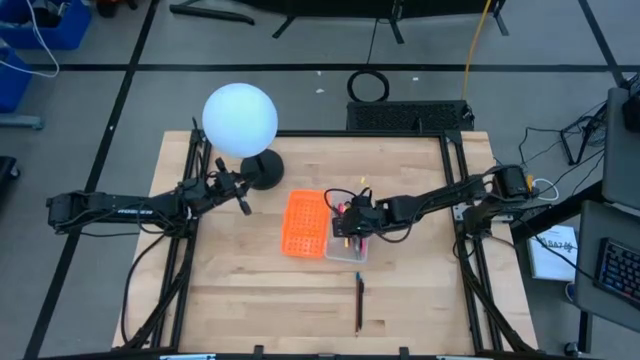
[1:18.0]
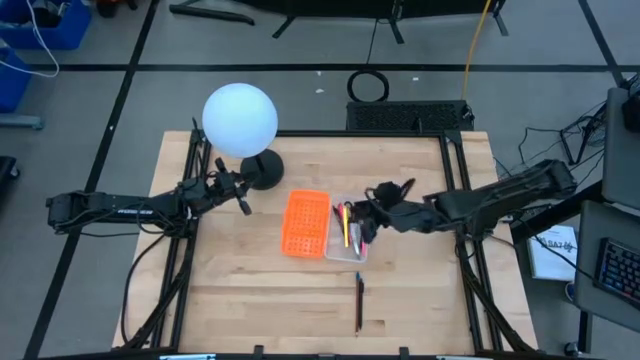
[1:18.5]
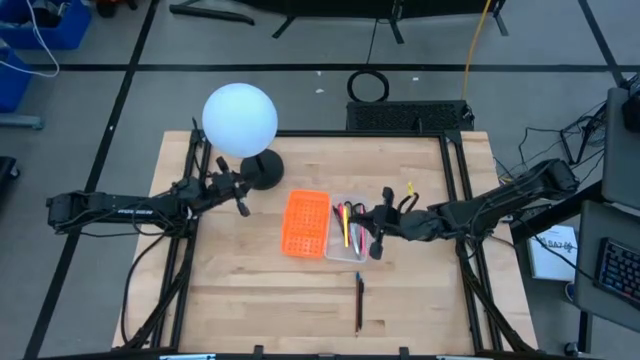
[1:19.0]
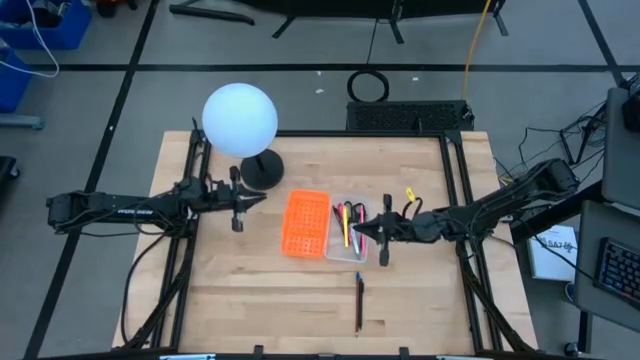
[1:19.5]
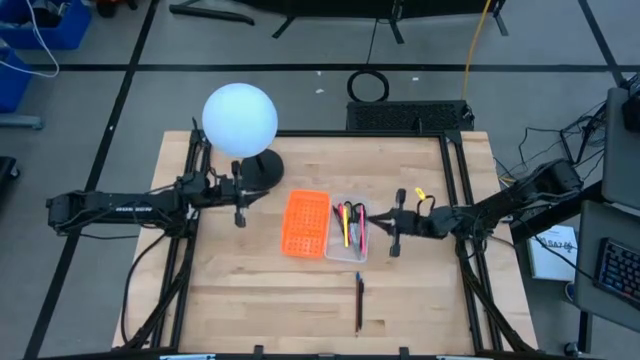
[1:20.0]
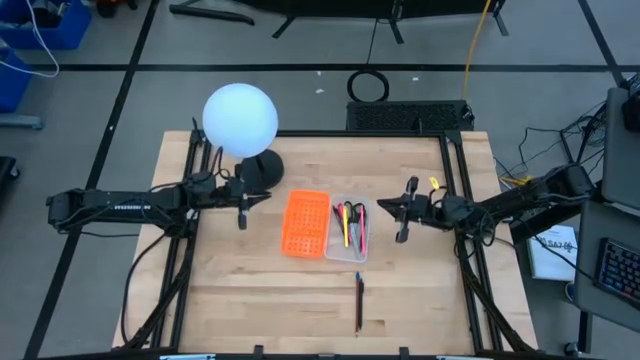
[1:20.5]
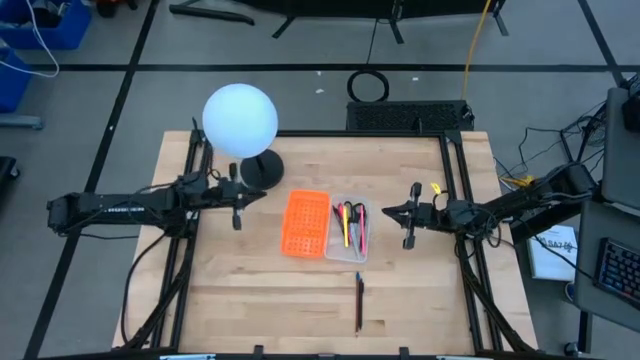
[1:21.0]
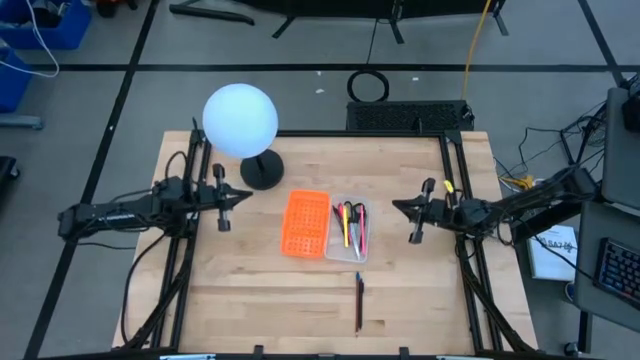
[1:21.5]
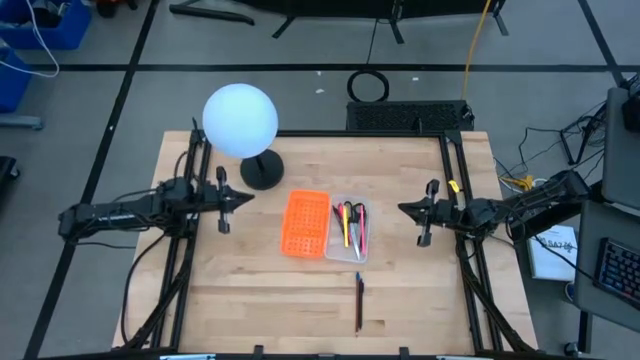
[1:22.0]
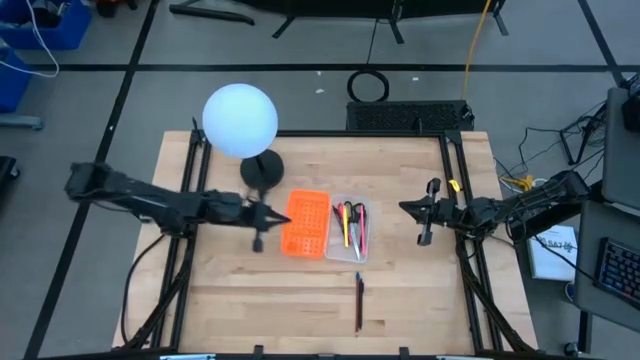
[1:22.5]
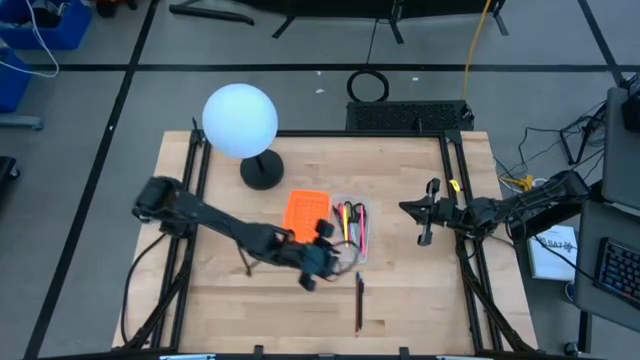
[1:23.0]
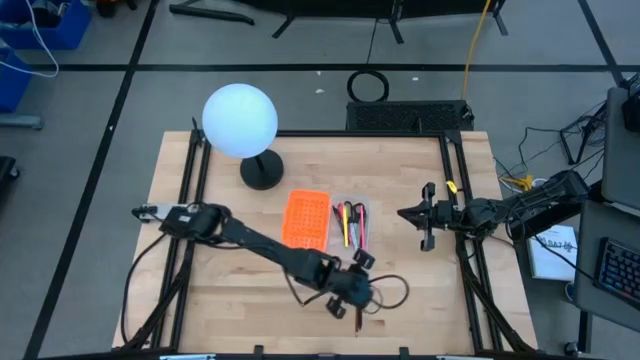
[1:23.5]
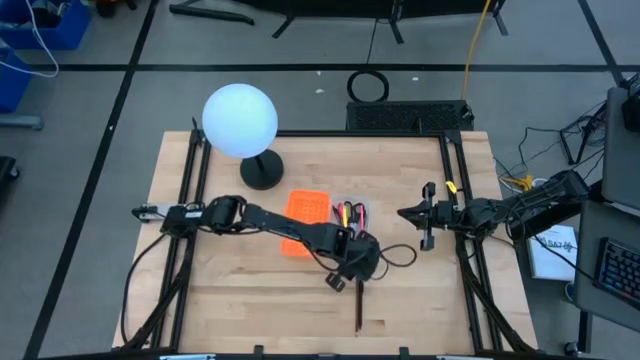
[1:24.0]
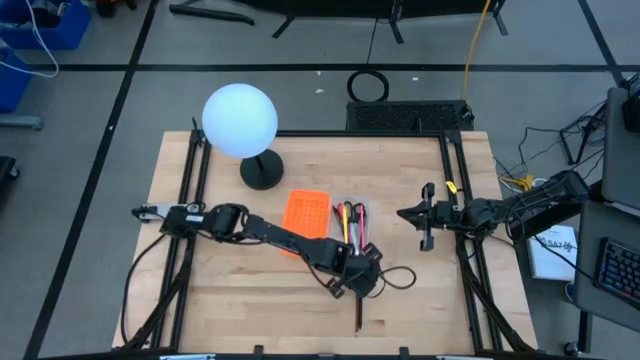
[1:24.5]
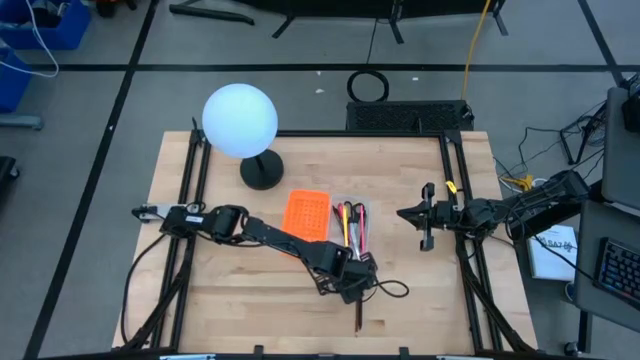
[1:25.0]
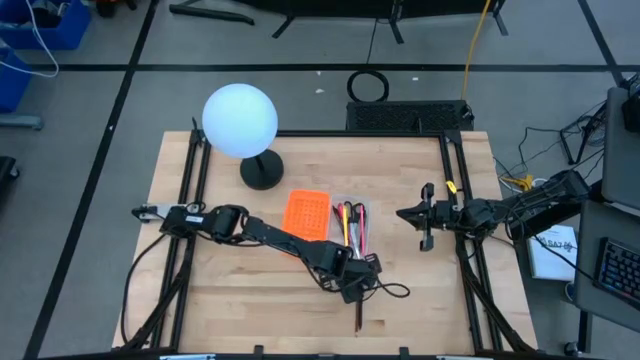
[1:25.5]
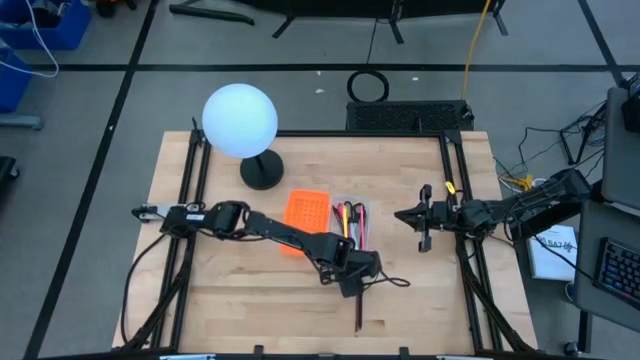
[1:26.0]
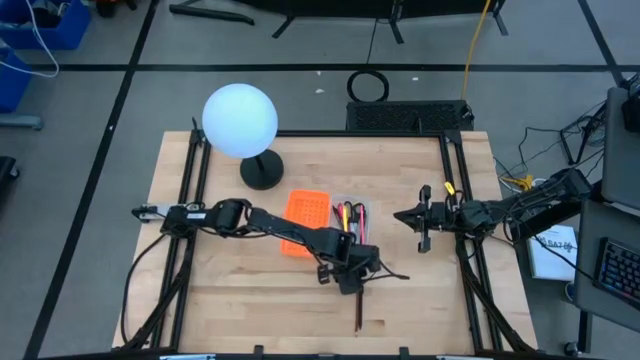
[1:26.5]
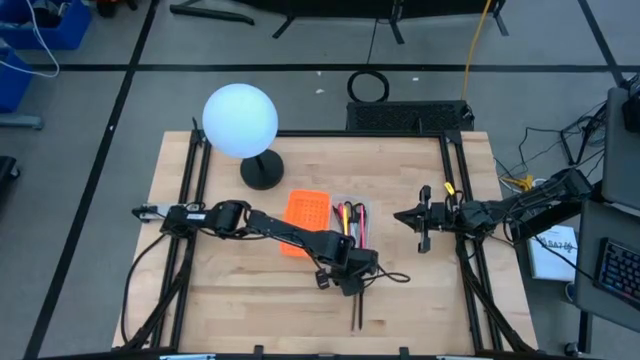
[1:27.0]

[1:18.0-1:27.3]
Task: Pick & place school supplies into a supply box
Put the brown pencil into the orange supply box

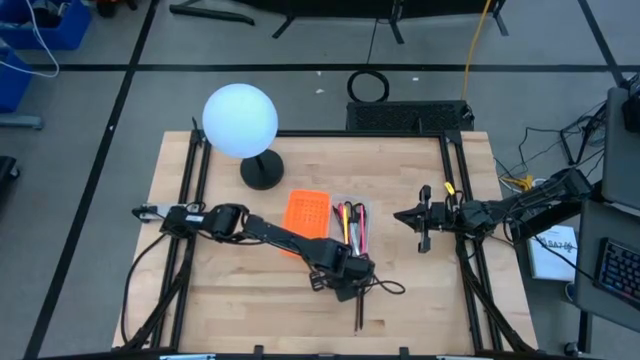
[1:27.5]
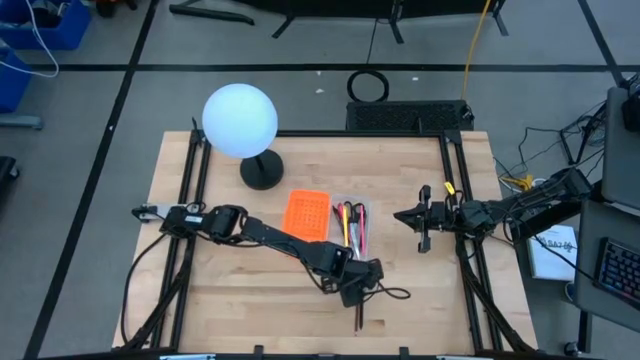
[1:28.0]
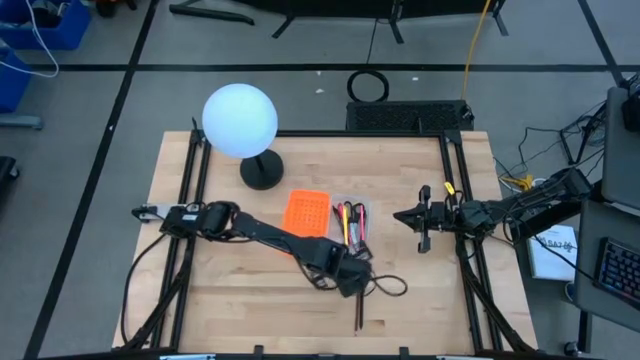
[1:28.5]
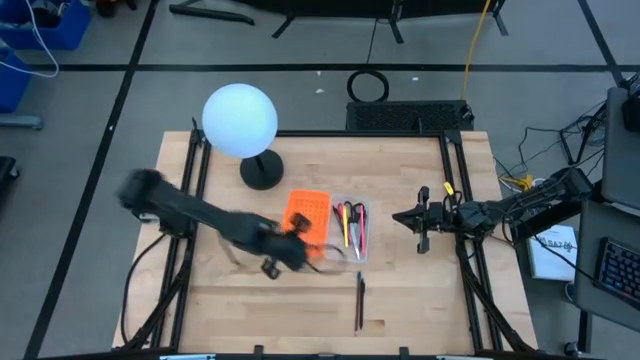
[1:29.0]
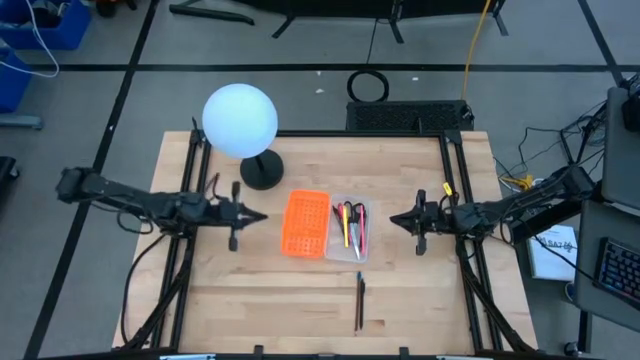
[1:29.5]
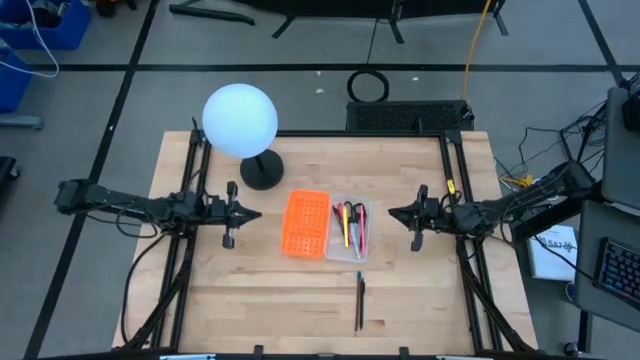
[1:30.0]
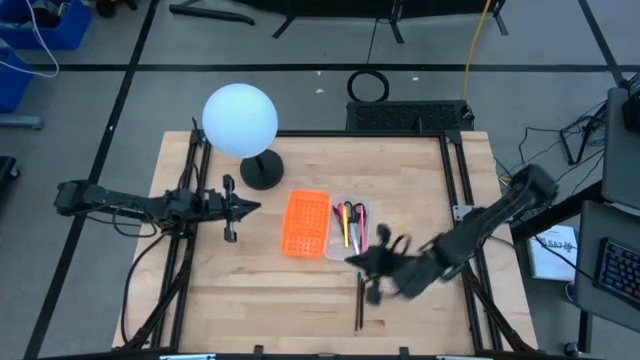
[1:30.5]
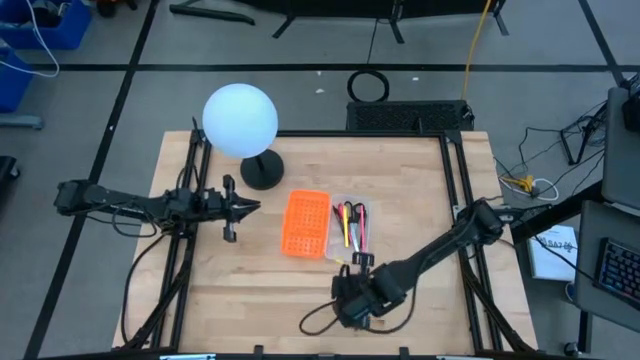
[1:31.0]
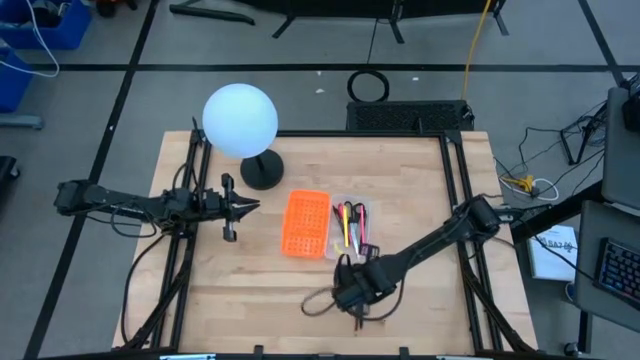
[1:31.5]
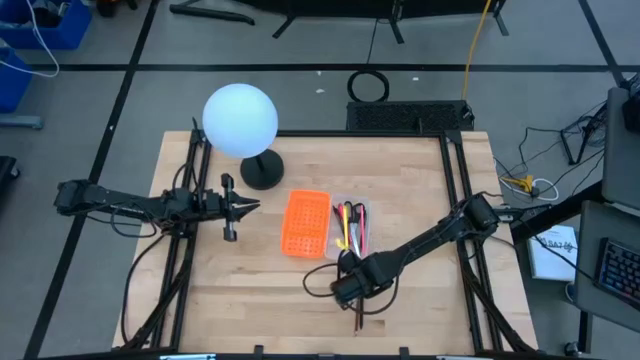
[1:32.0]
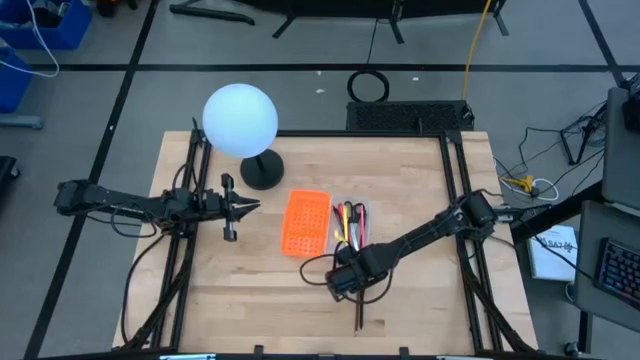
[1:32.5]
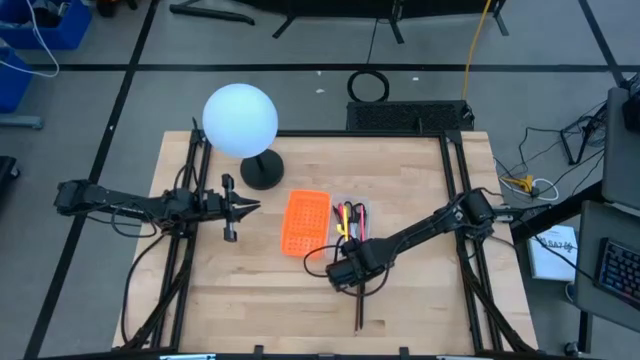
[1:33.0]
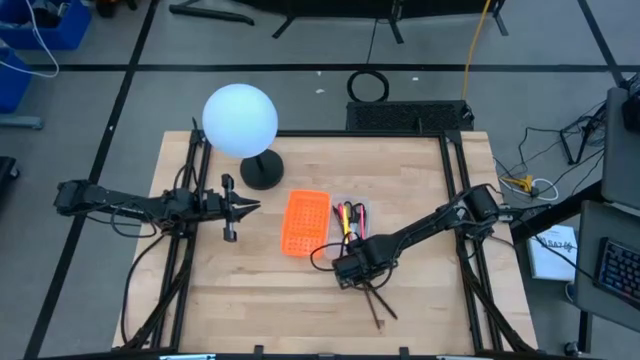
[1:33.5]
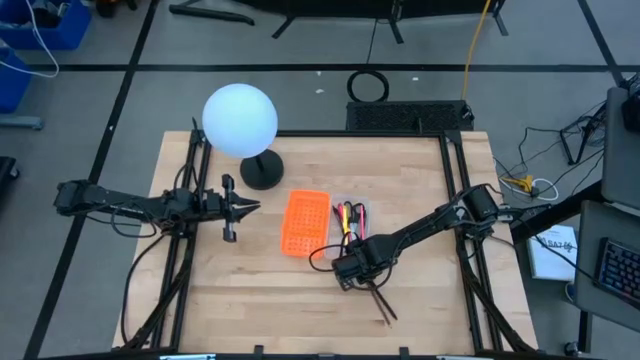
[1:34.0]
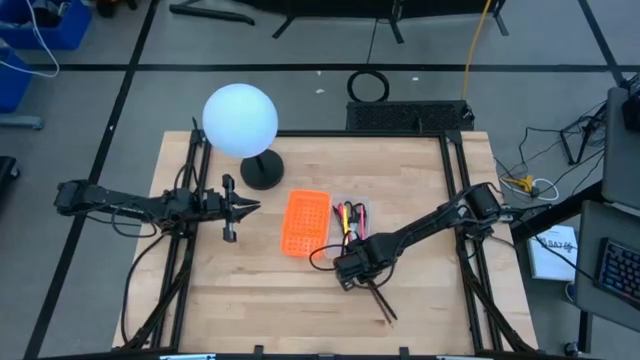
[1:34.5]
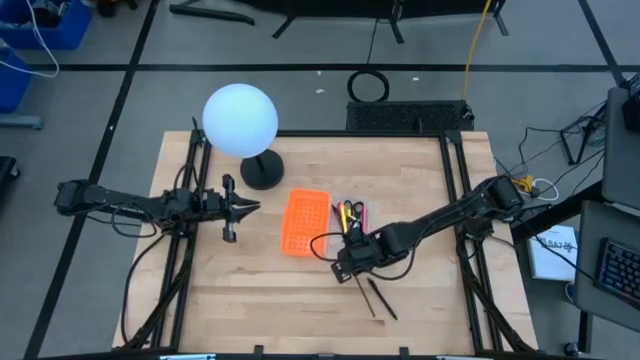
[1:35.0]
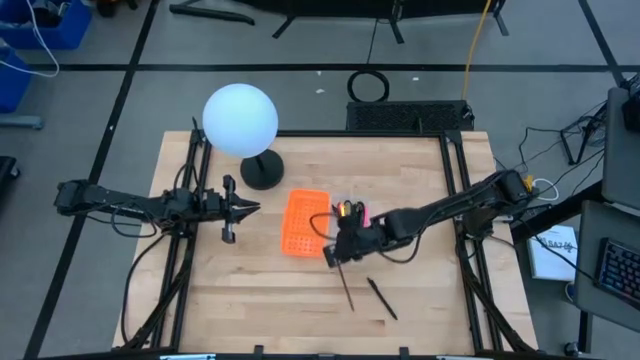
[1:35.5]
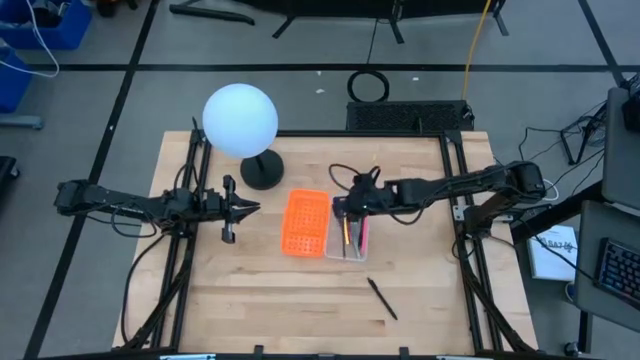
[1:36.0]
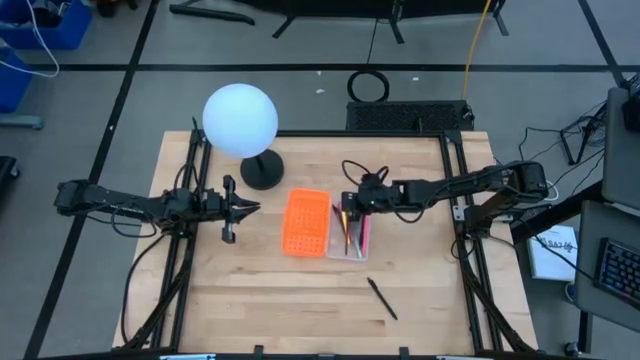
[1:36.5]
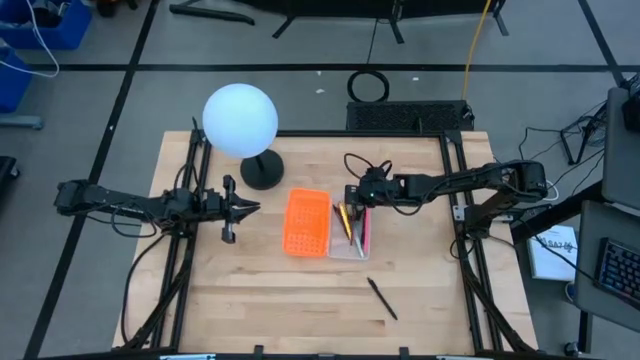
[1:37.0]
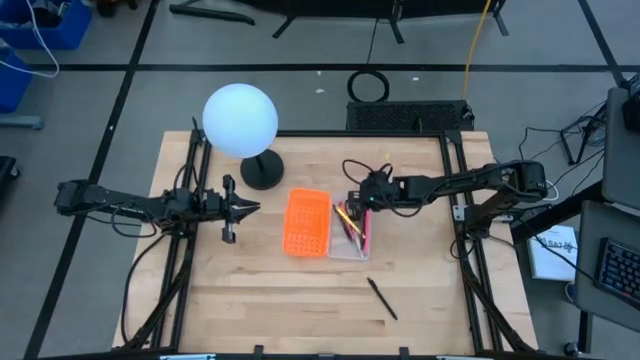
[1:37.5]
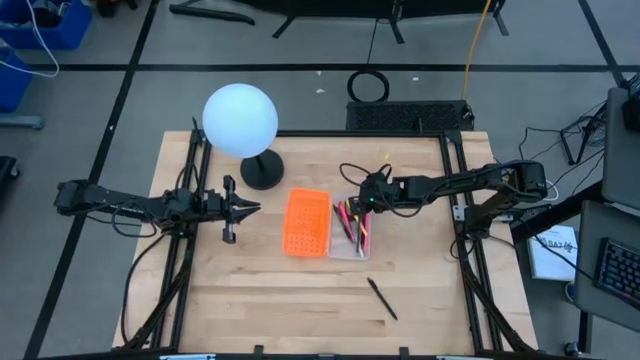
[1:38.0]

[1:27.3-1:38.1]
Put the brown pencil into the orange supply box
